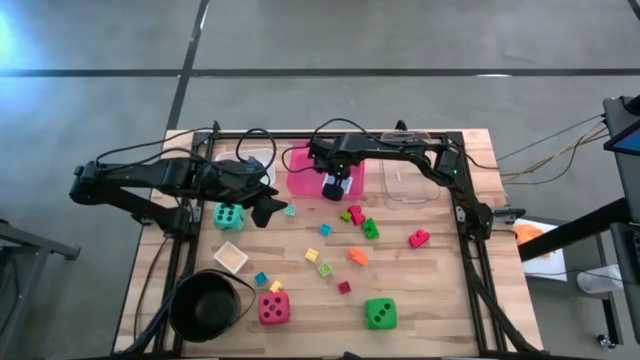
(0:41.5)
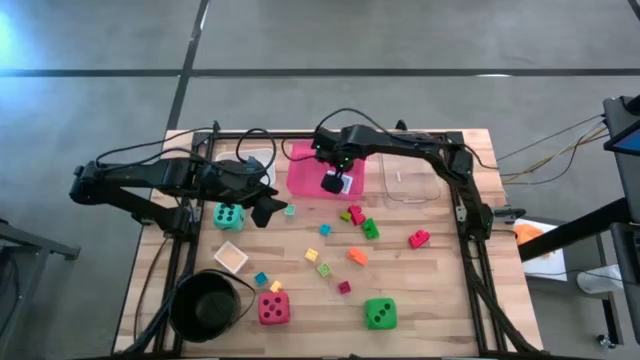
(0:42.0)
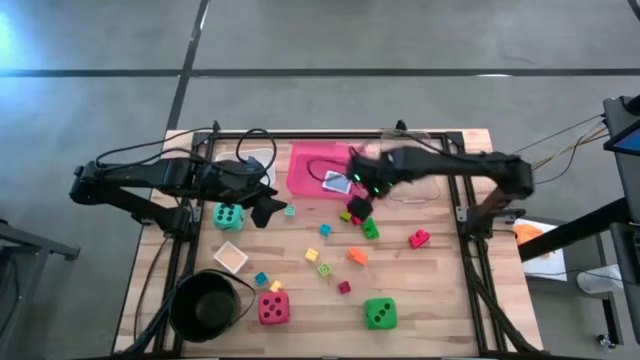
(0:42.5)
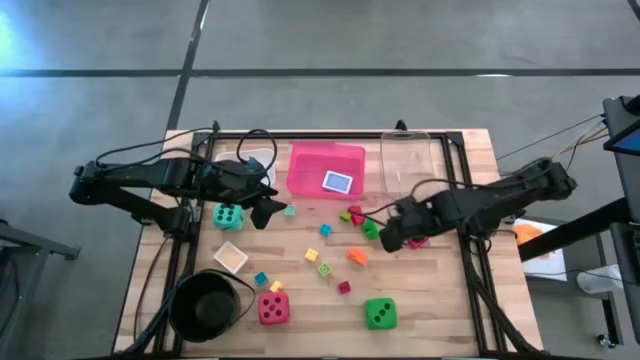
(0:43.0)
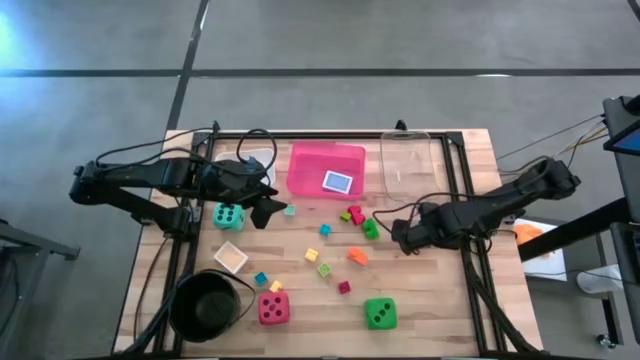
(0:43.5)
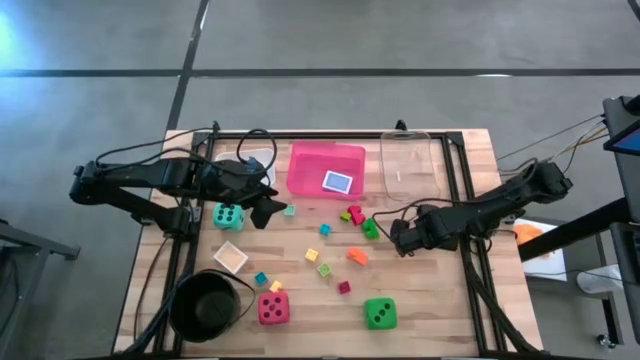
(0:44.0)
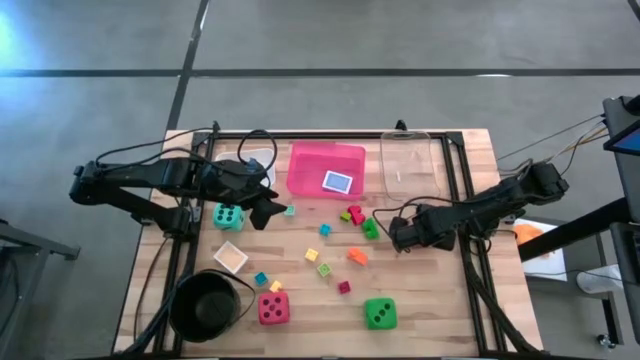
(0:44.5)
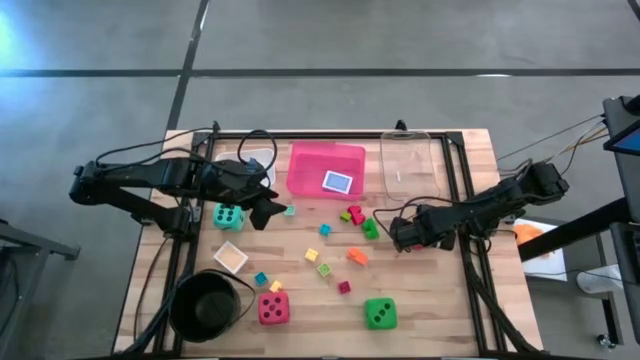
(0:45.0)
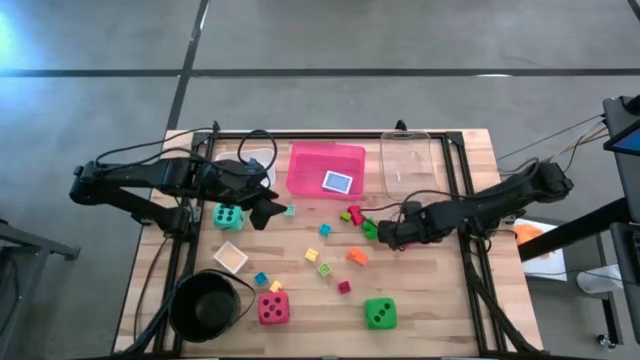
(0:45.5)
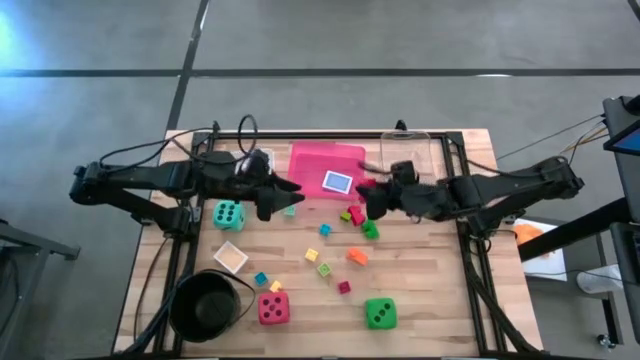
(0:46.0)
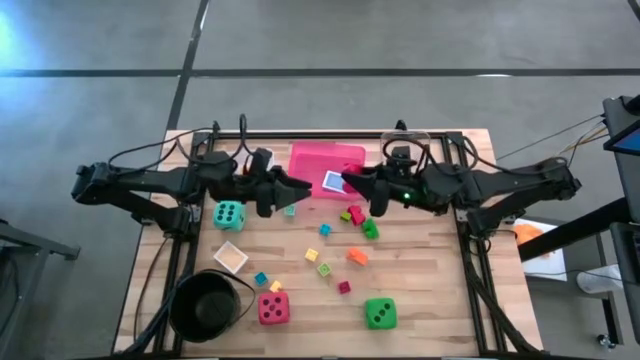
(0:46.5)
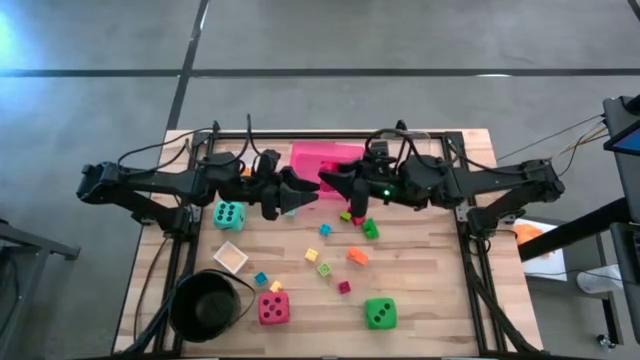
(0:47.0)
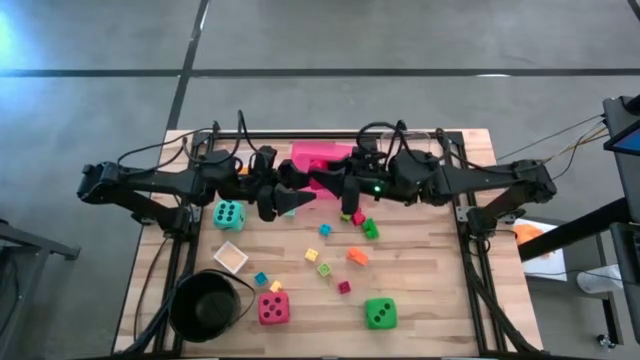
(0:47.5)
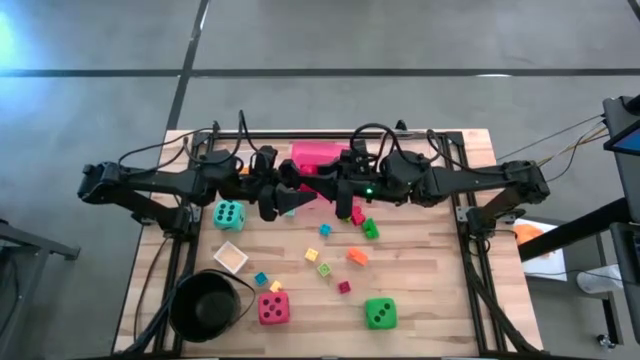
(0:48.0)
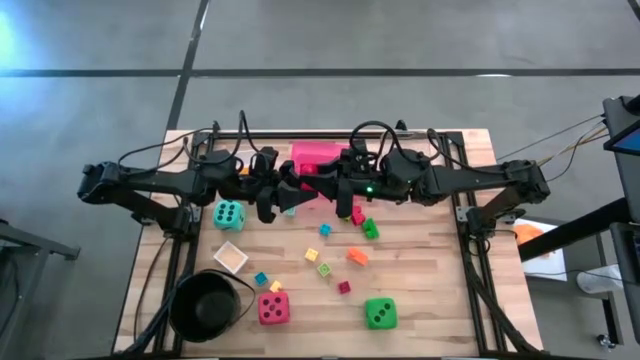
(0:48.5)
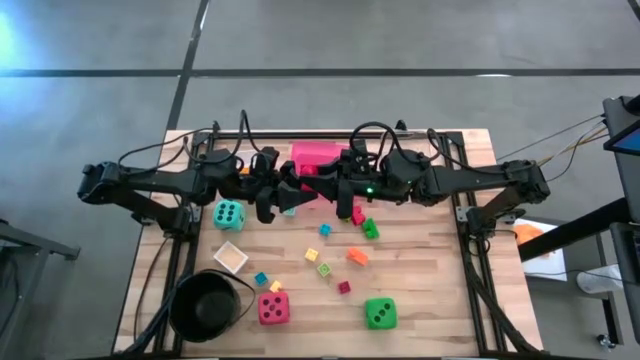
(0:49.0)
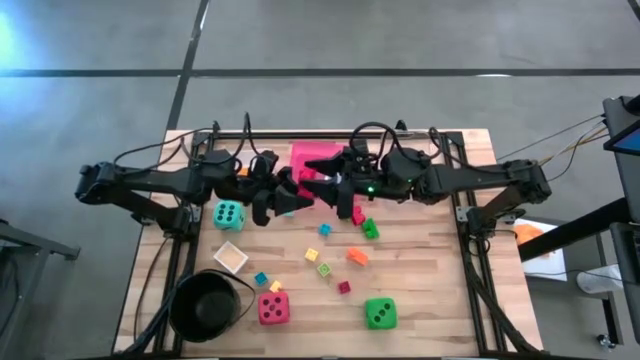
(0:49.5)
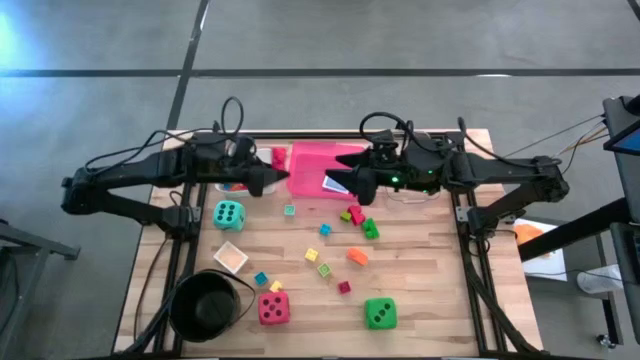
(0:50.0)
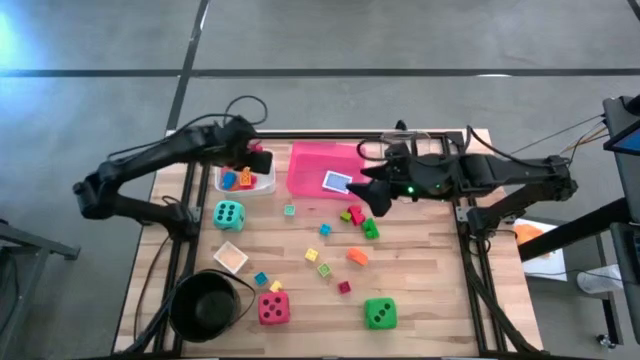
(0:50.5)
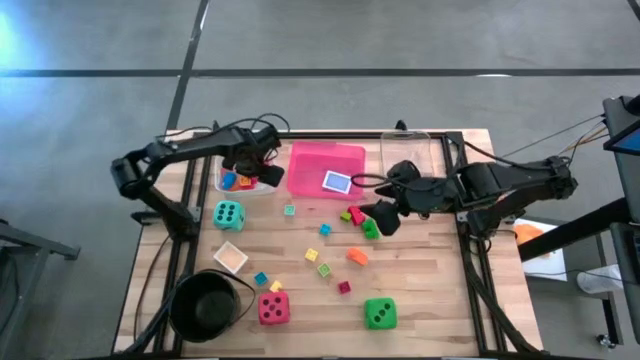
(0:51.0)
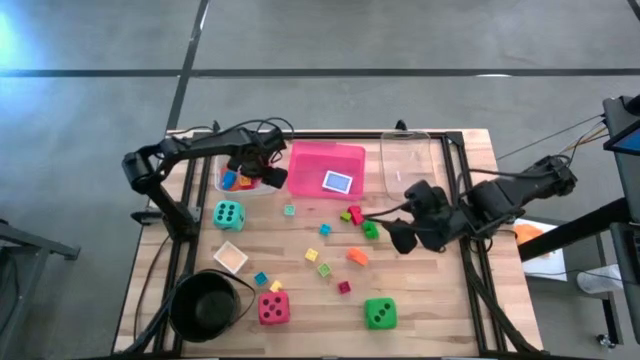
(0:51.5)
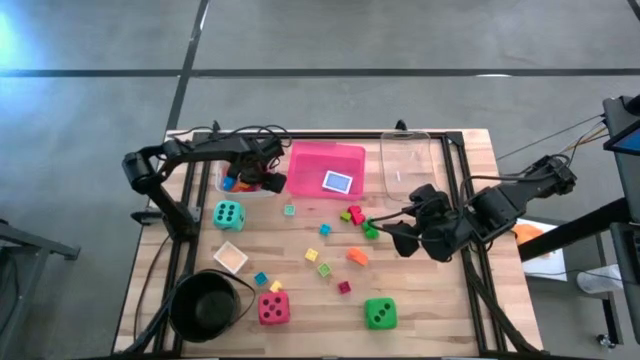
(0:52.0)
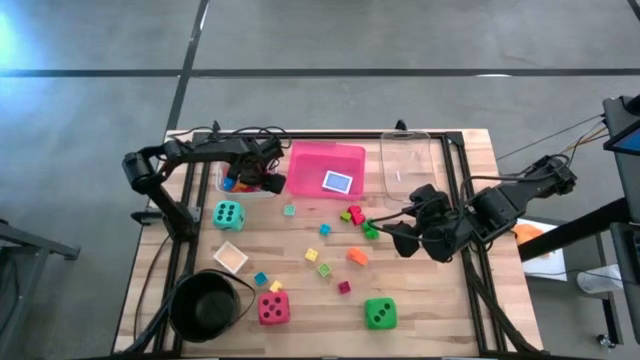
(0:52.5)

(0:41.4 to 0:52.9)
Task: Pick & Place Toys
Put the red game piece into the white bin

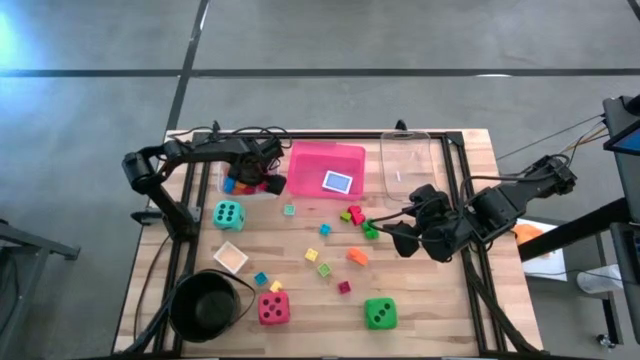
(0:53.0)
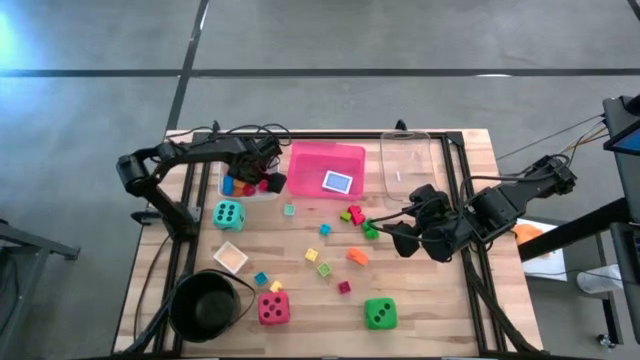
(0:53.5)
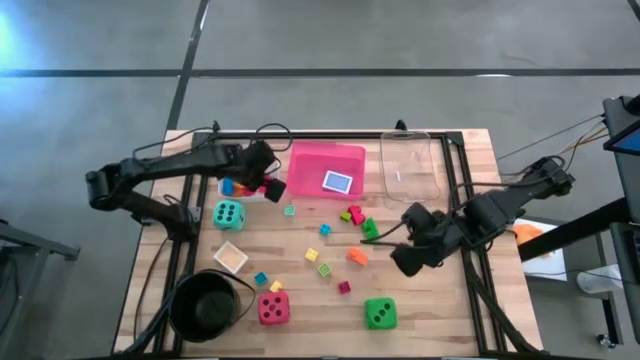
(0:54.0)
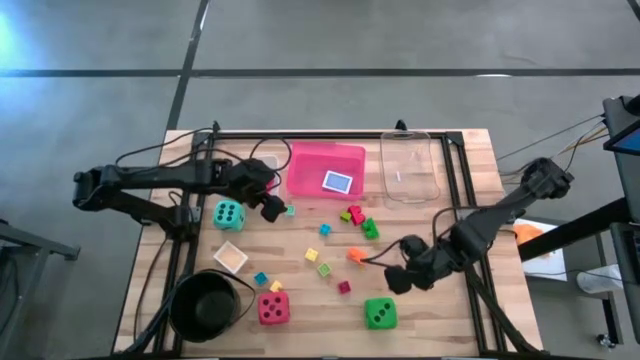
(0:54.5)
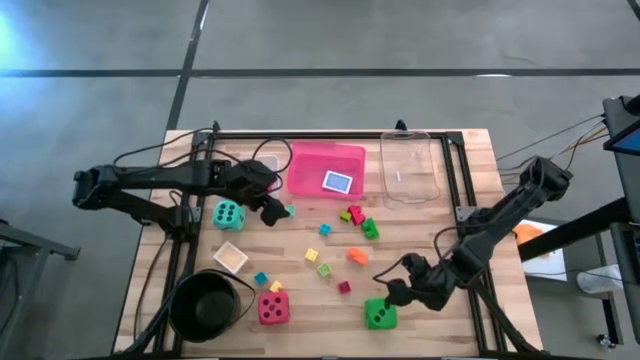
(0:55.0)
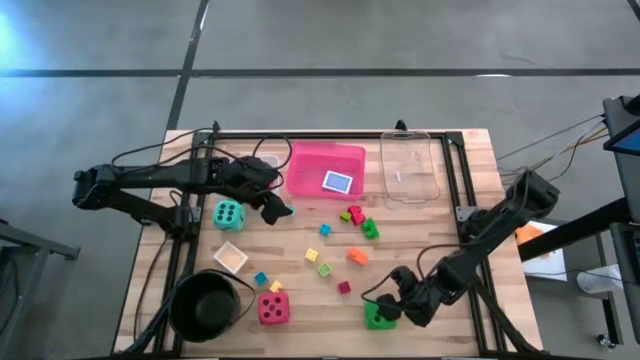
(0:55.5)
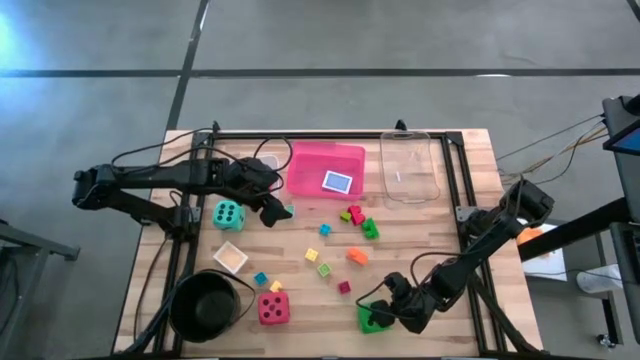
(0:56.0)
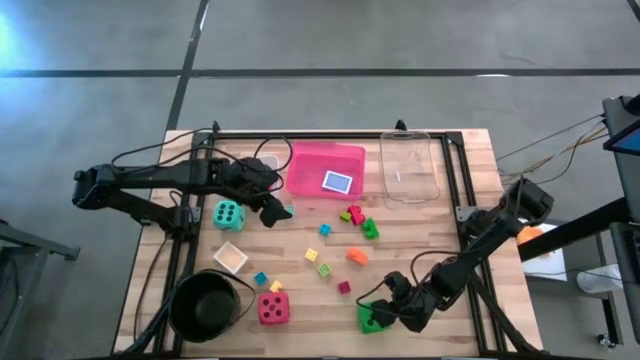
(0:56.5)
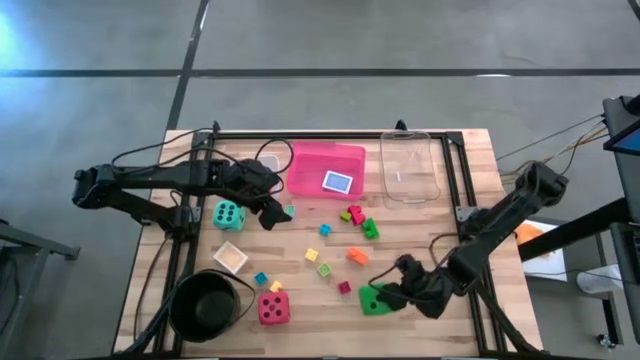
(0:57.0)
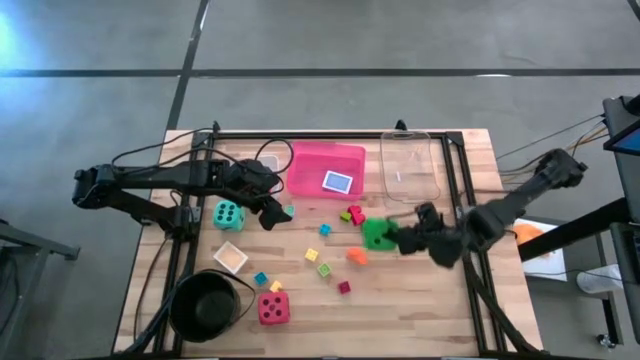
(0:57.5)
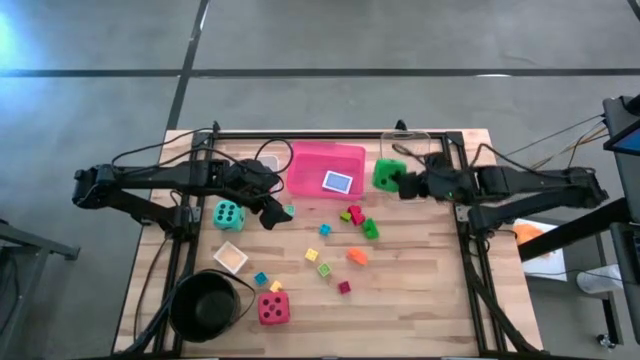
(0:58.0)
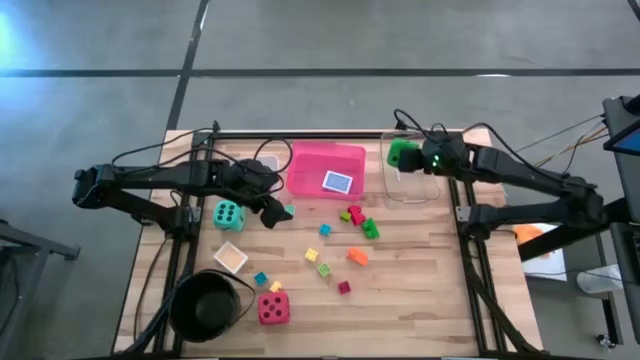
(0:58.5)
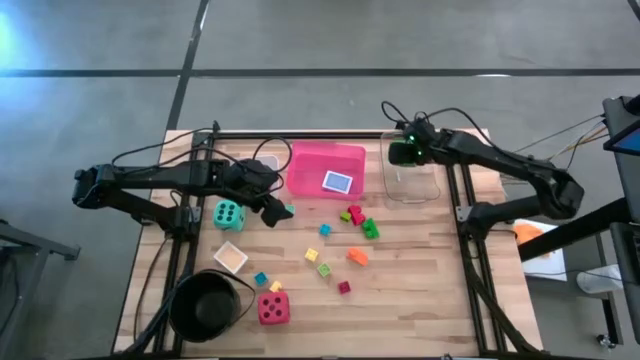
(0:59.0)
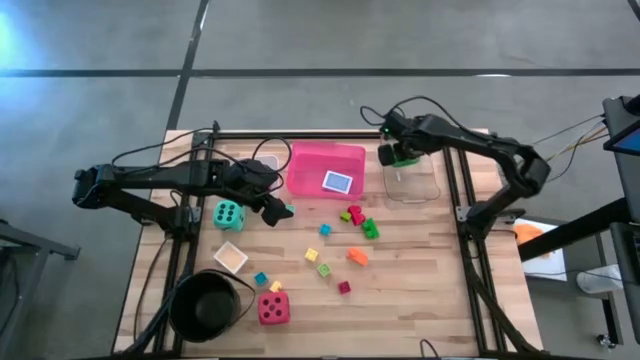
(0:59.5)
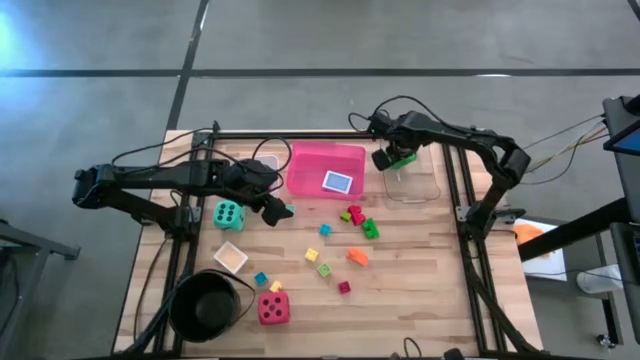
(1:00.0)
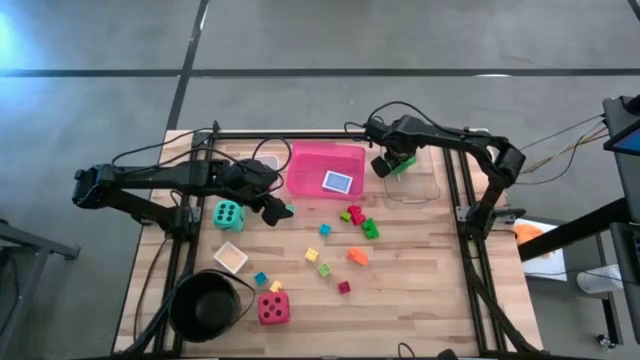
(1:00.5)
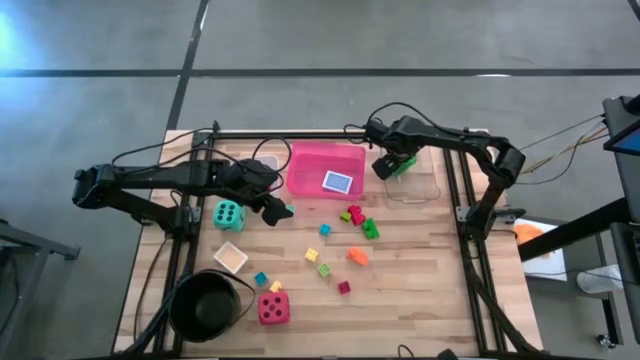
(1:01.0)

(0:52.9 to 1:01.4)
Put the green dice into the transparent bin

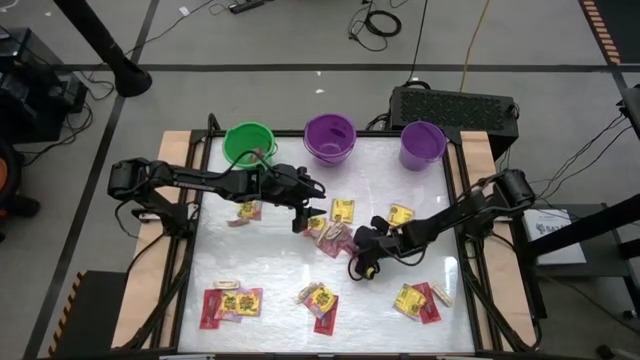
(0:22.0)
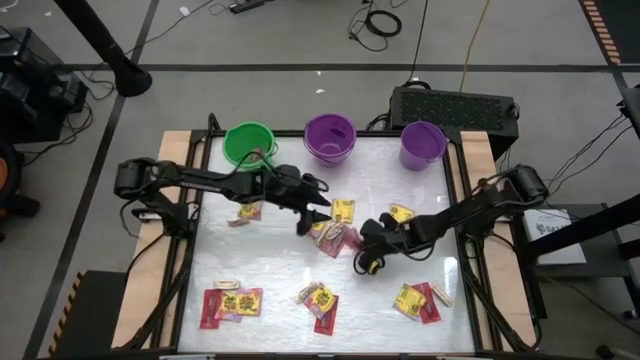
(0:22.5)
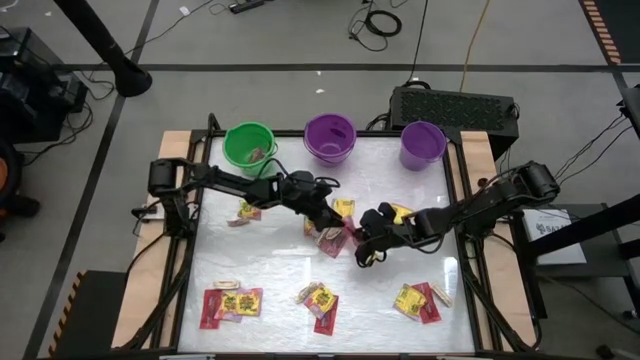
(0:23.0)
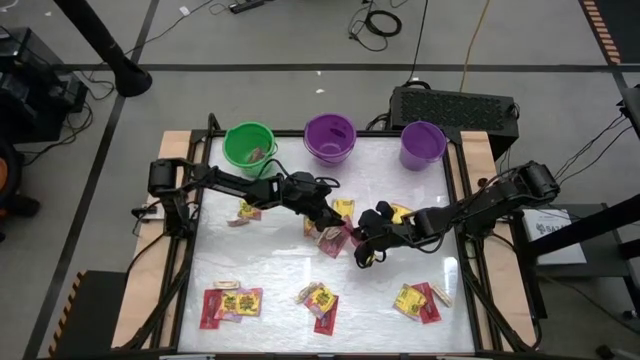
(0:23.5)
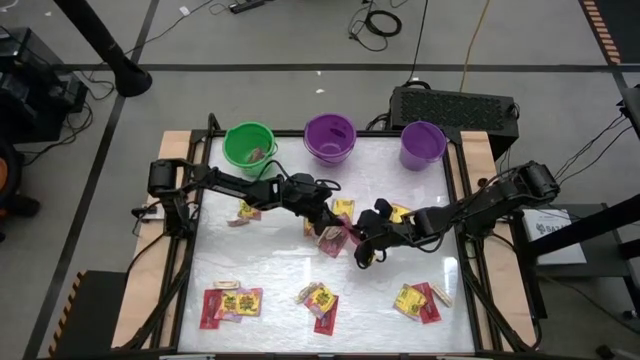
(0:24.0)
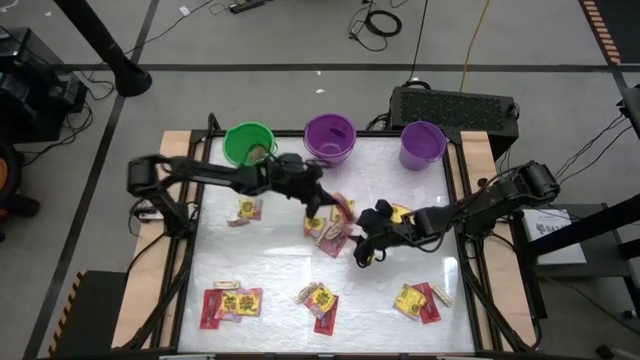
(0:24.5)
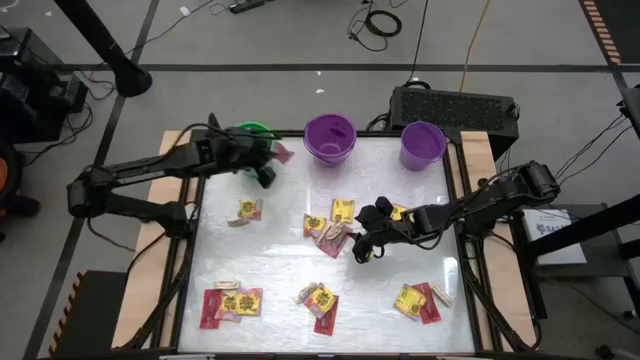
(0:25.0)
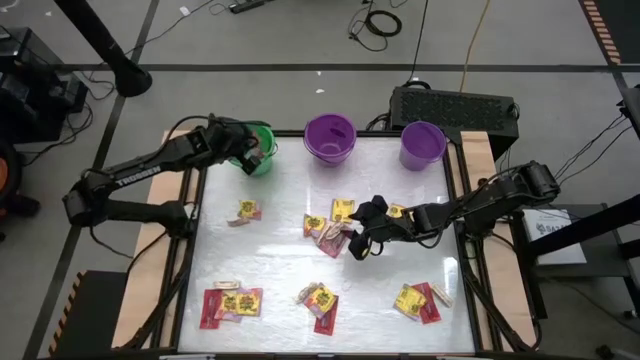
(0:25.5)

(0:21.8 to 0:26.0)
Task: Sort candy by brand, put in halloween buckets
Put the red candy pack in the green bucket
